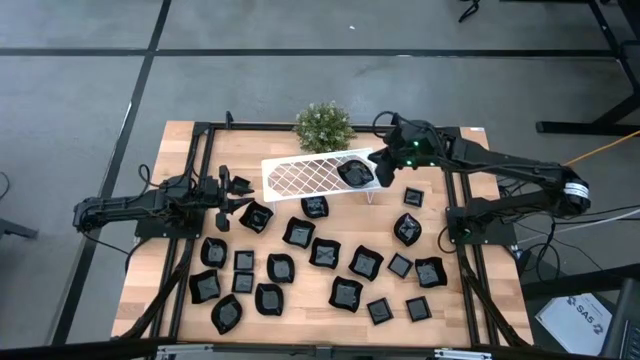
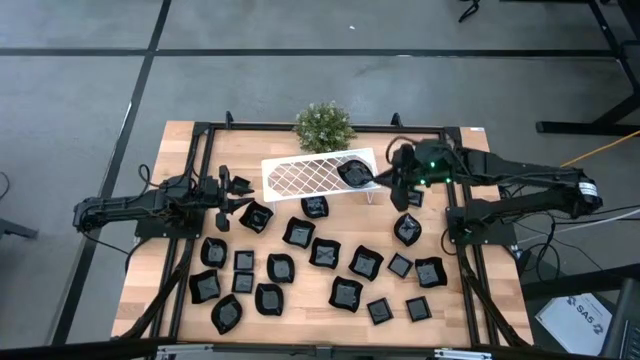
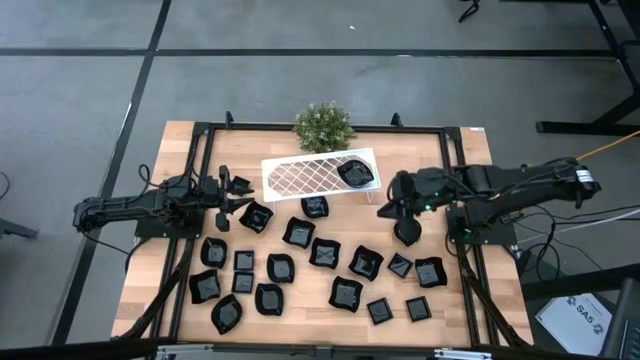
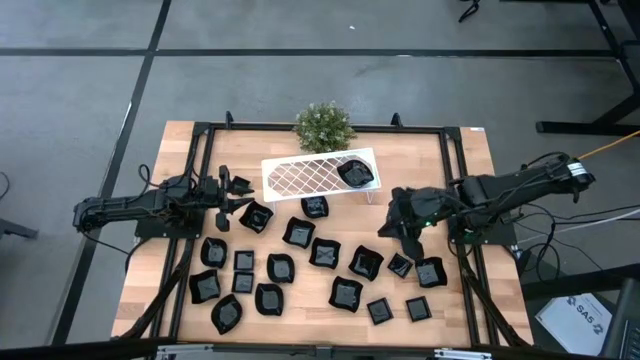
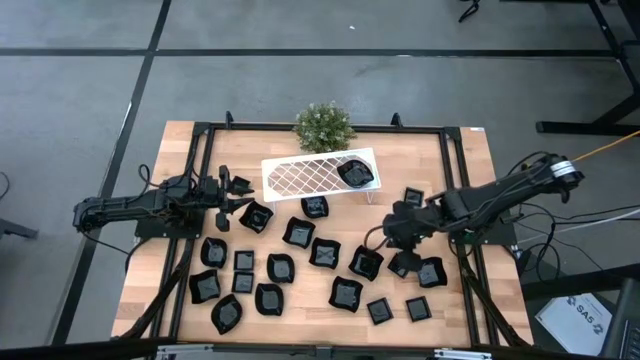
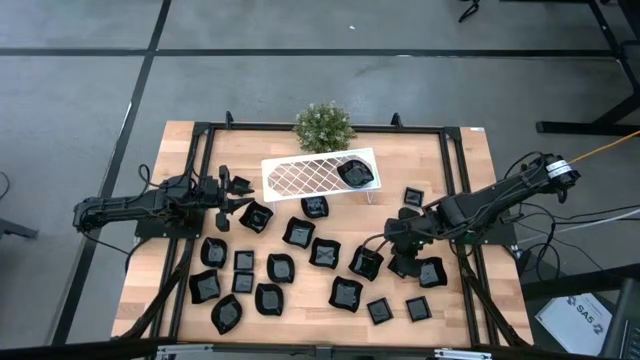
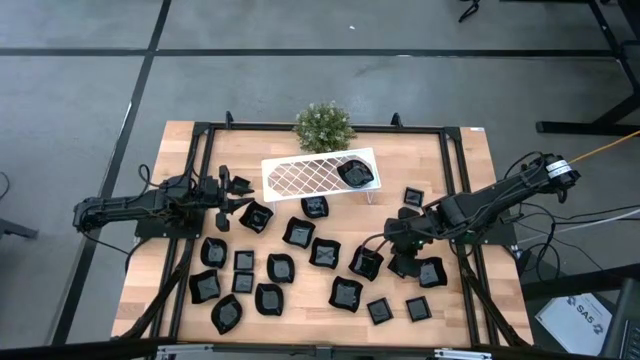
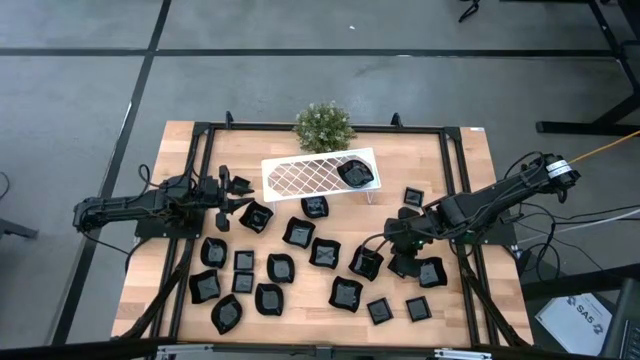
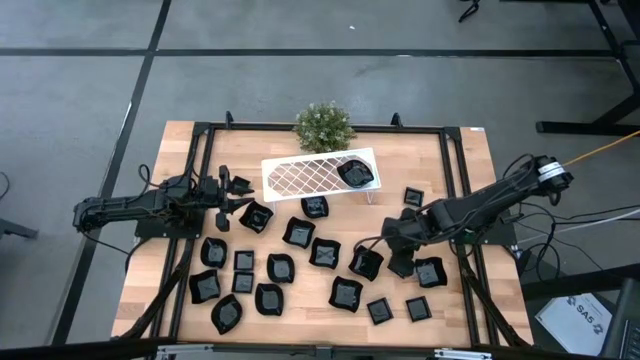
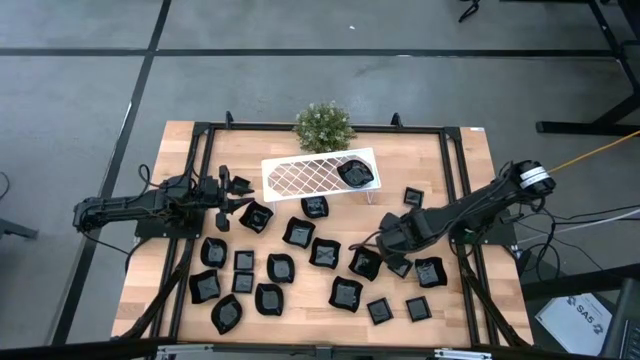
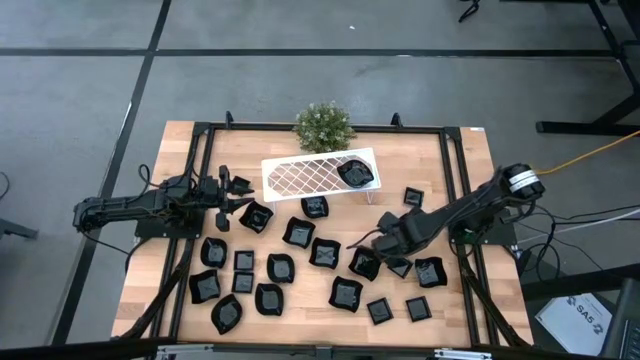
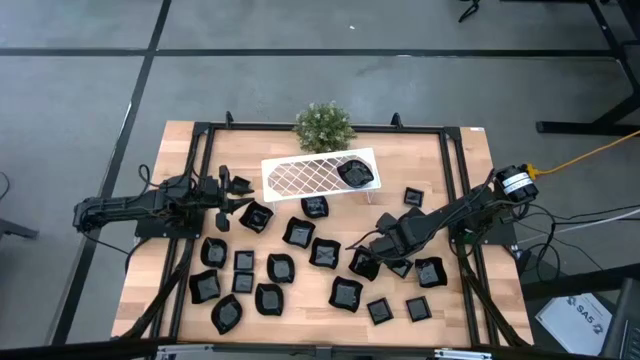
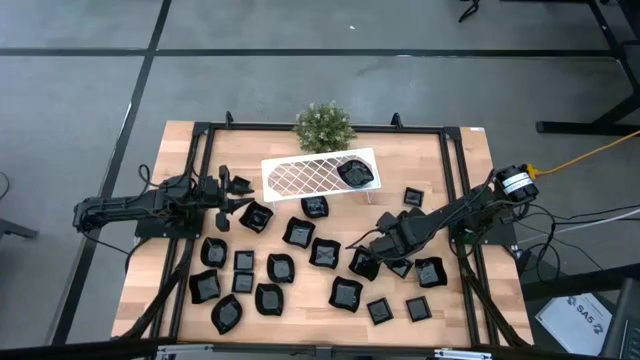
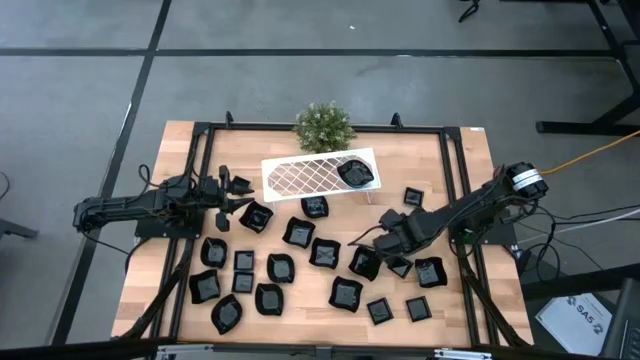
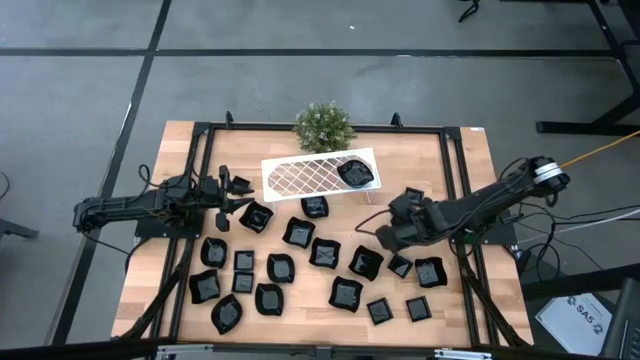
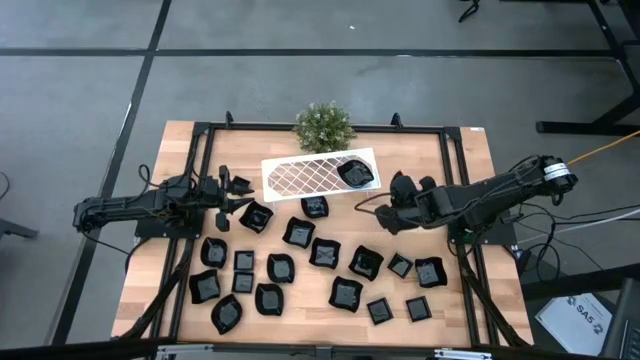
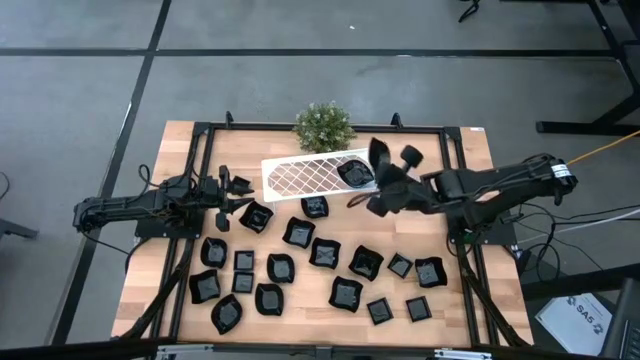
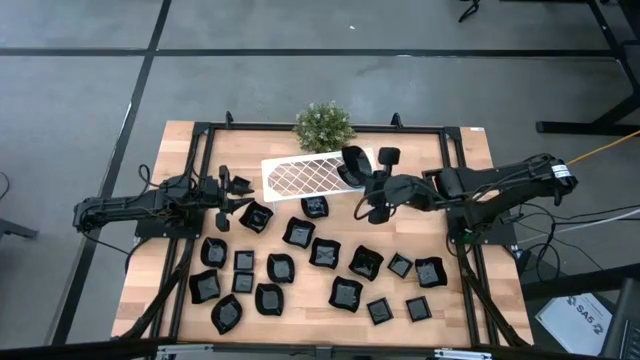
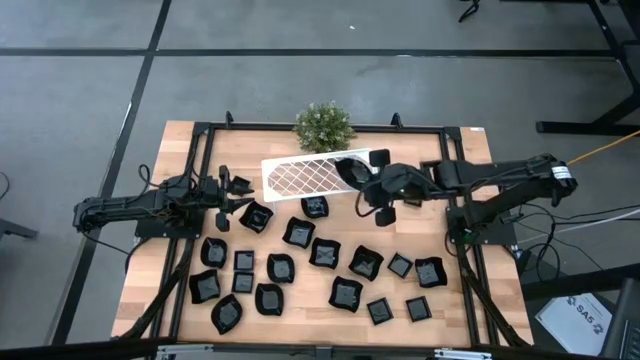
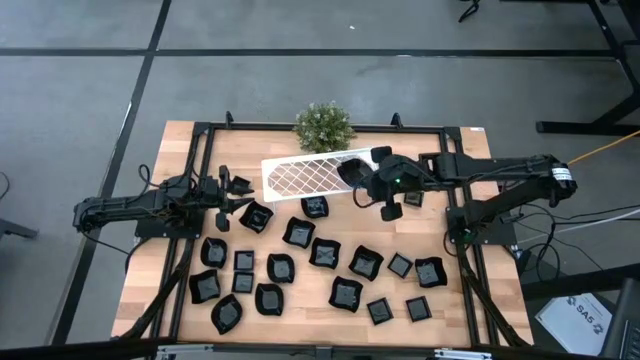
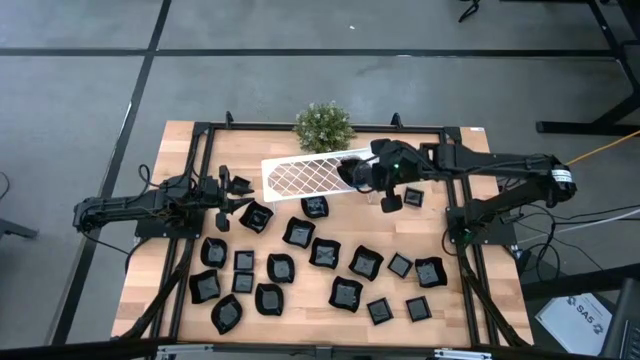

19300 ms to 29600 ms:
Task: Pick & Place Mini shaped plates
Stack the leaf shaped plate on top of the leaf-shaped plate on the shelf

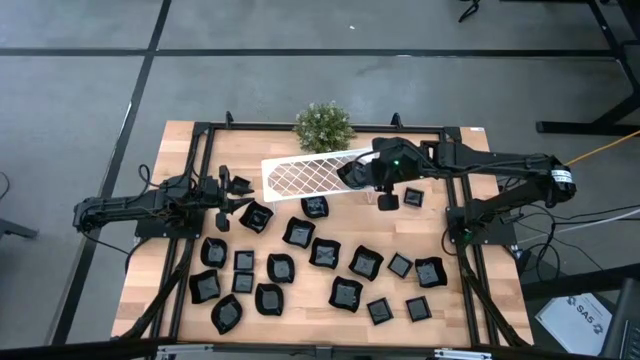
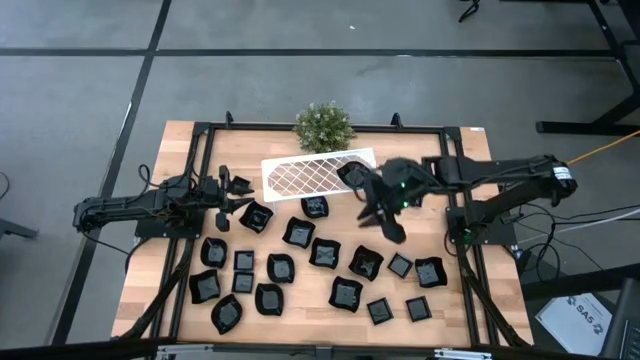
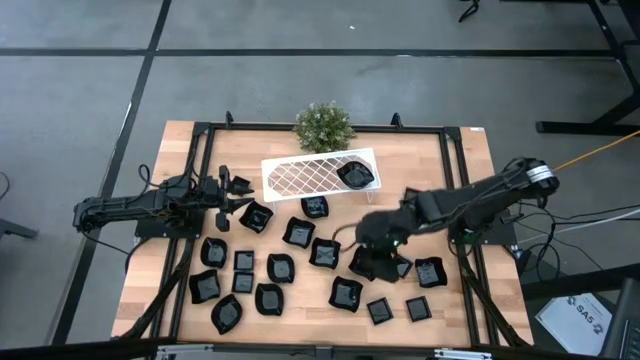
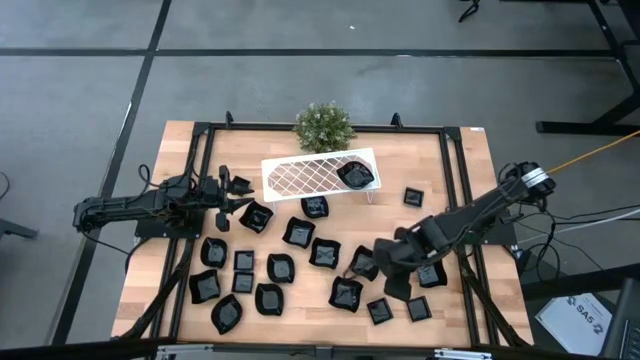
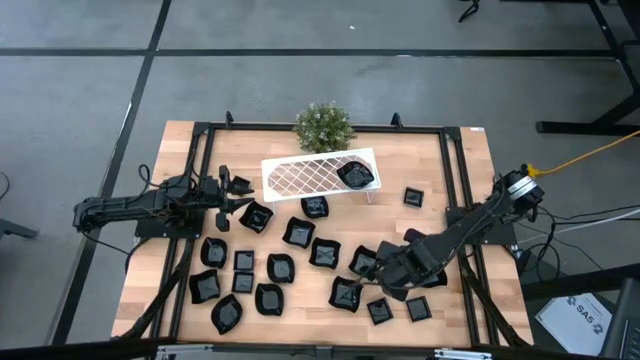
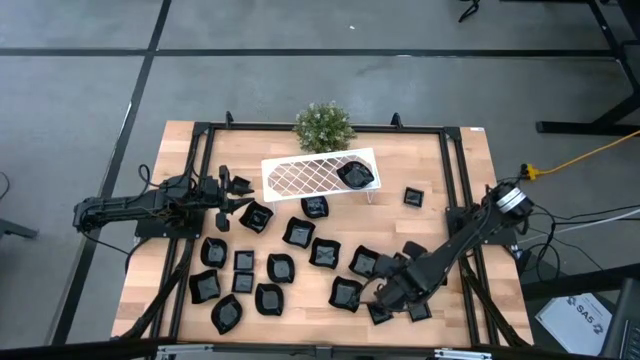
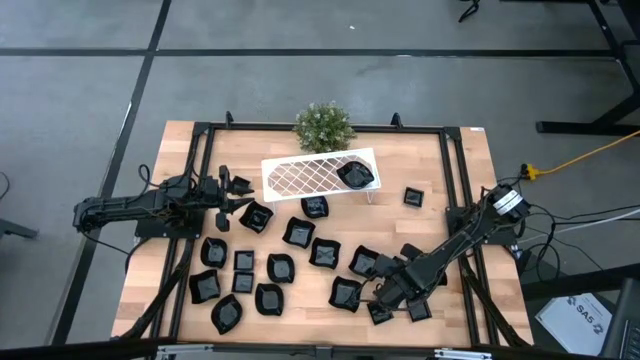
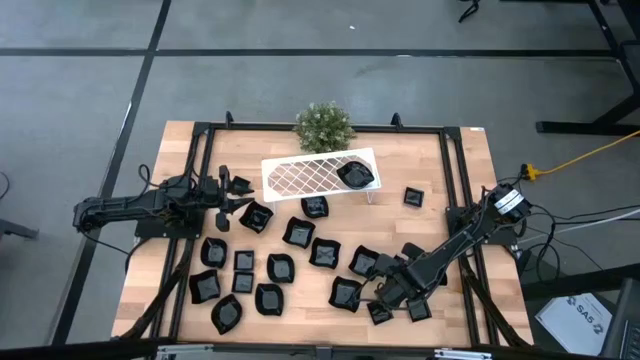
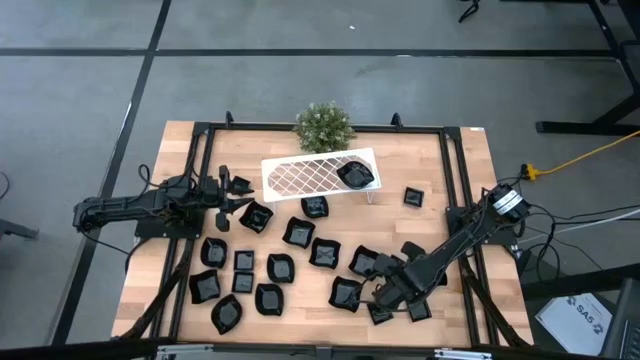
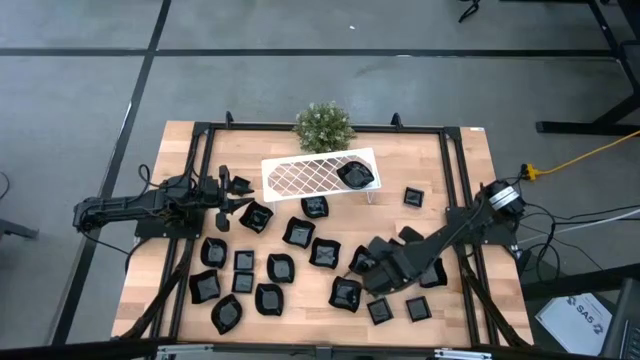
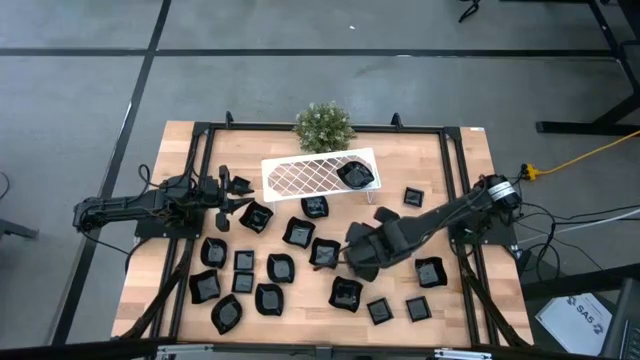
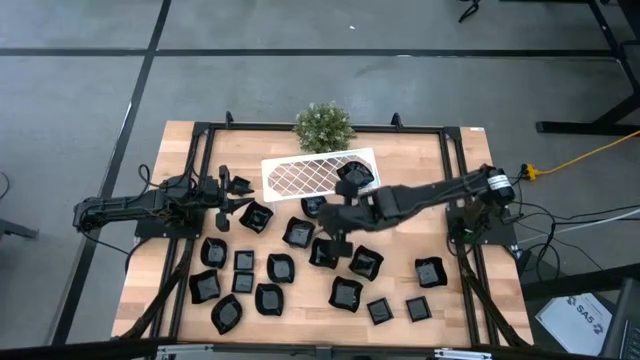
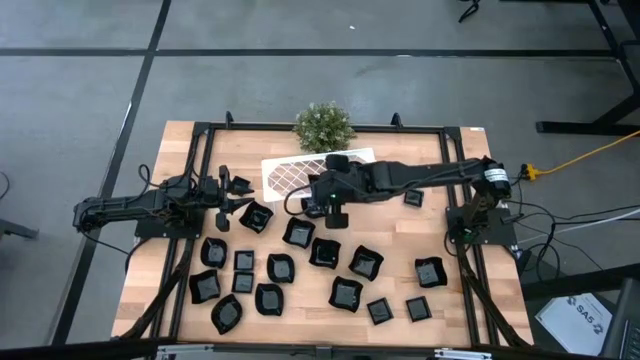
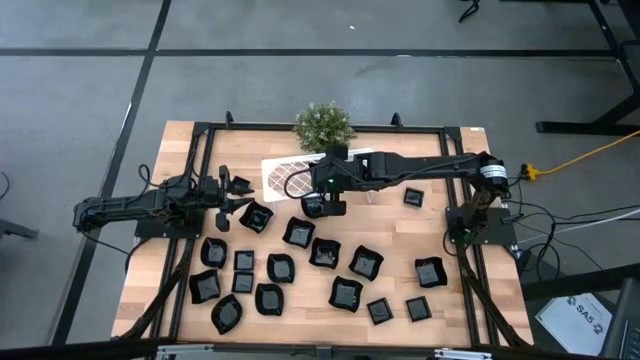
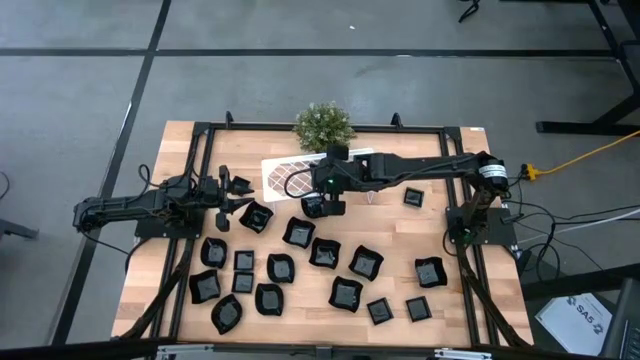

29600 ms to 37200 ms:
Put the square plate on the shelf

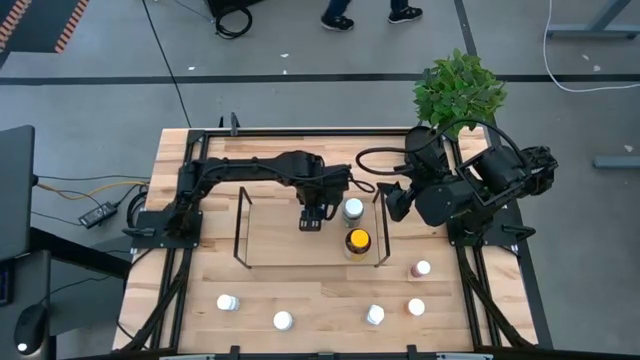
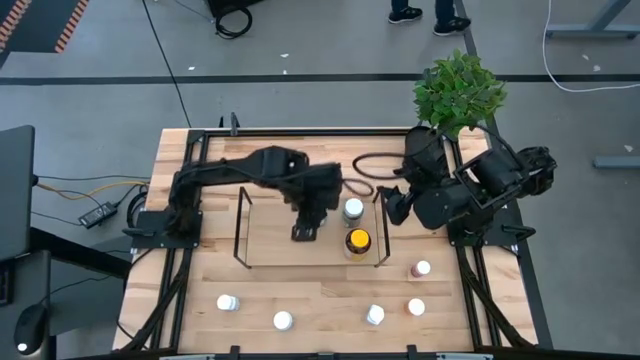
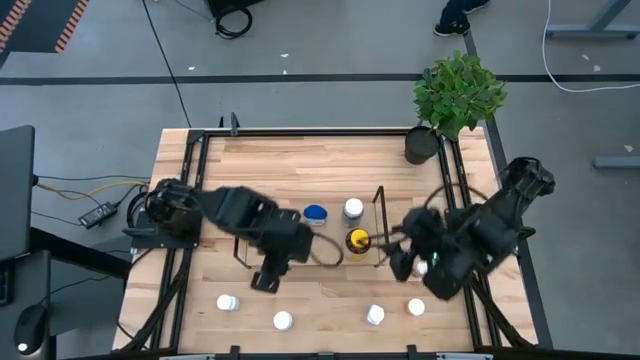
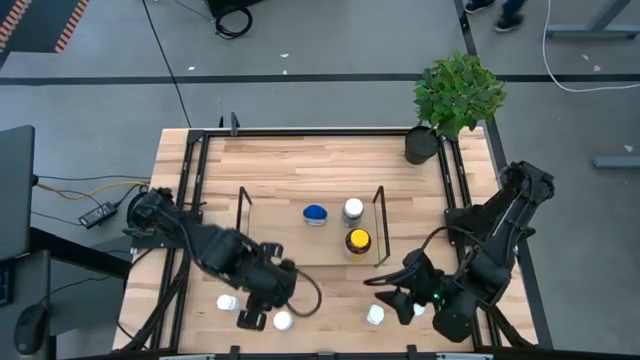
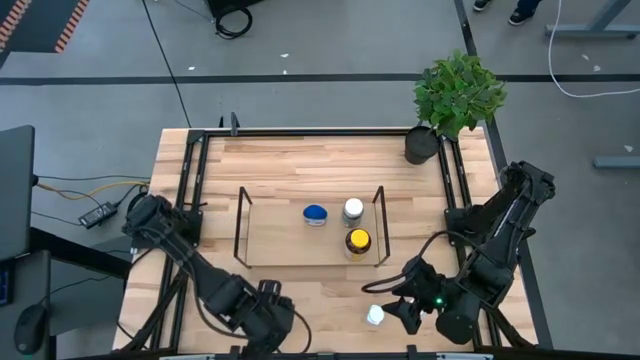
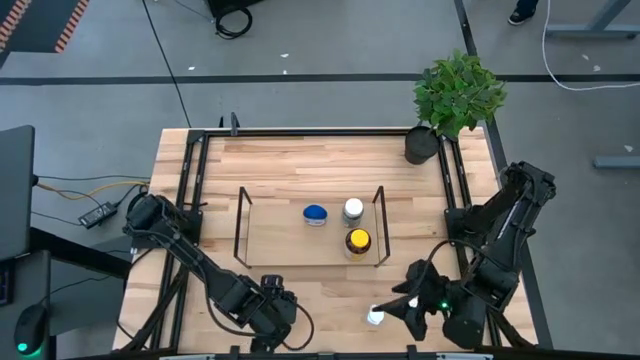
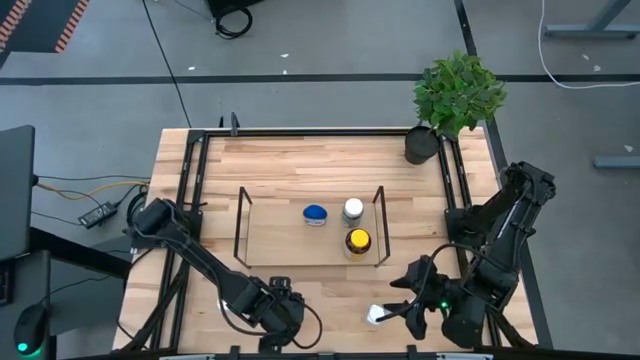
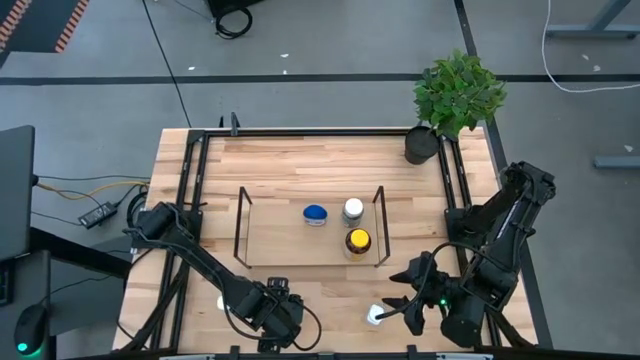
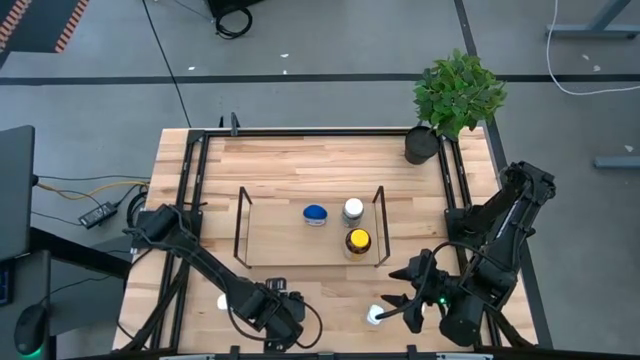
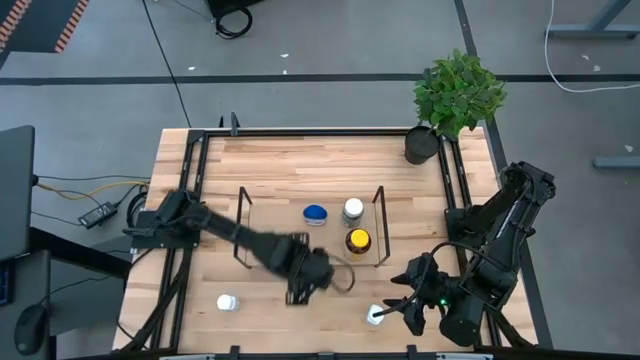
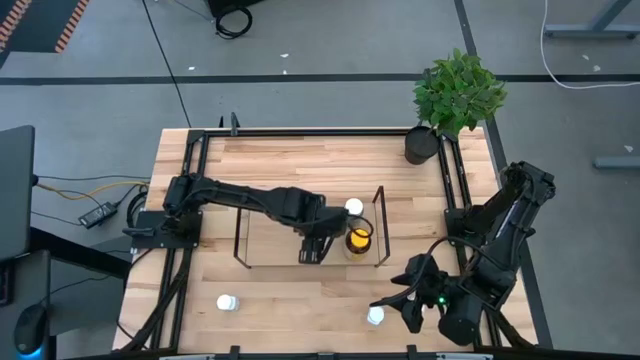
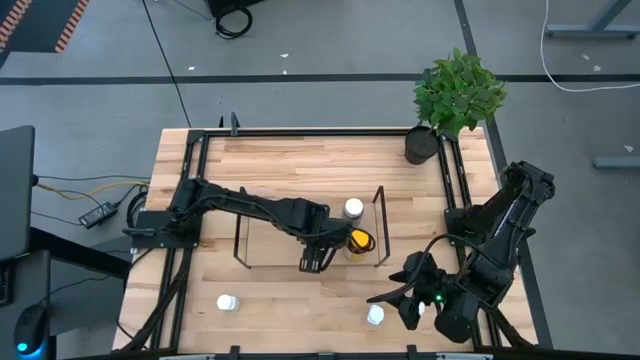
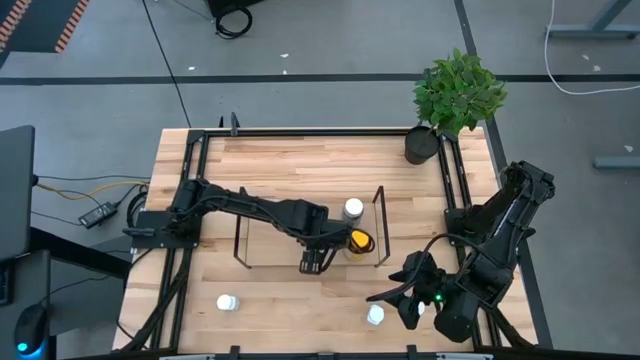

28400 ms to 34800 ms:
Task: Pick and place medicine bottles onto shelf by color
Put the white and green medicine bottle on the shelf
